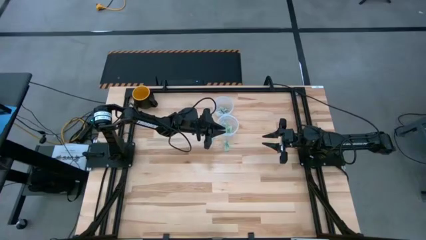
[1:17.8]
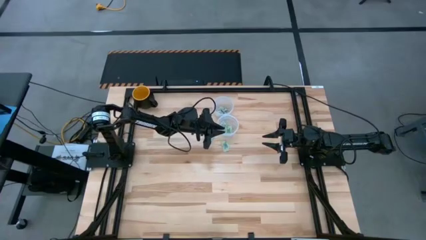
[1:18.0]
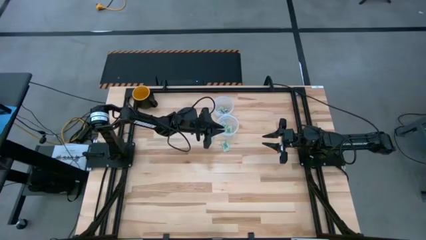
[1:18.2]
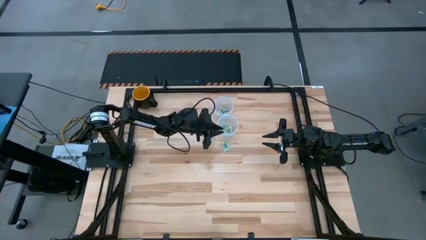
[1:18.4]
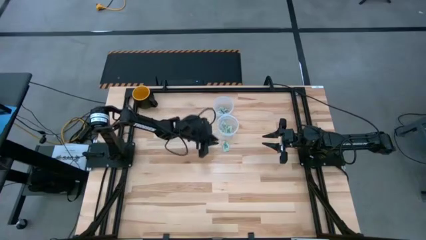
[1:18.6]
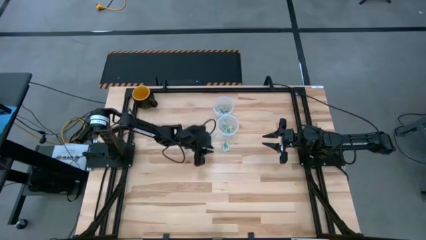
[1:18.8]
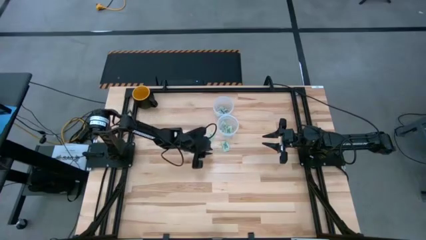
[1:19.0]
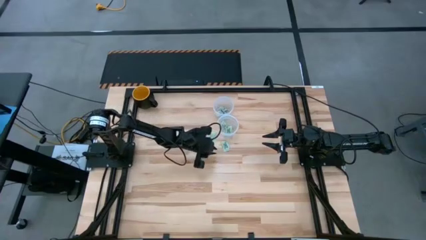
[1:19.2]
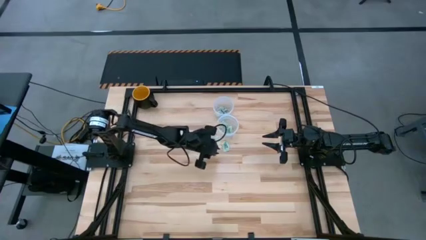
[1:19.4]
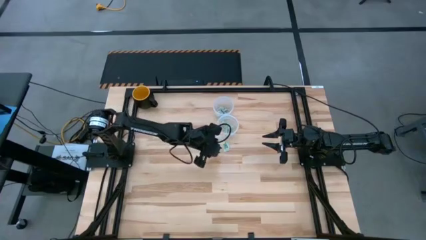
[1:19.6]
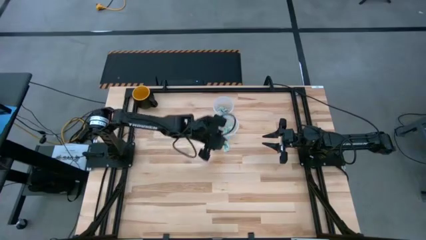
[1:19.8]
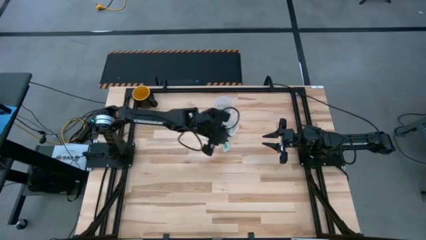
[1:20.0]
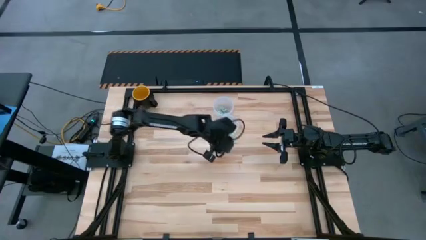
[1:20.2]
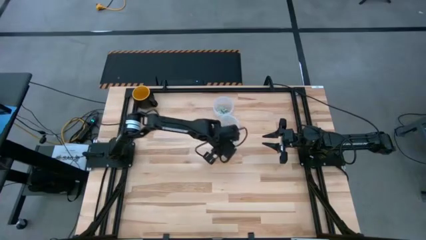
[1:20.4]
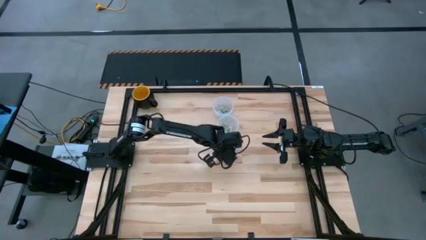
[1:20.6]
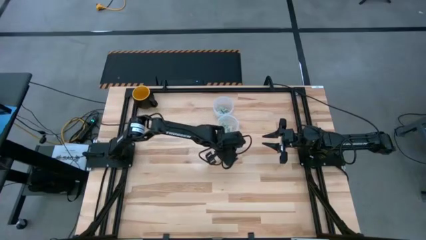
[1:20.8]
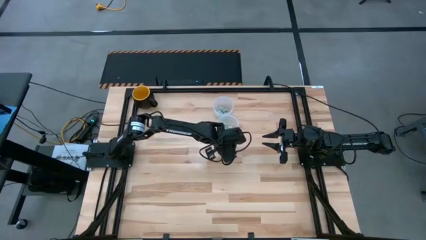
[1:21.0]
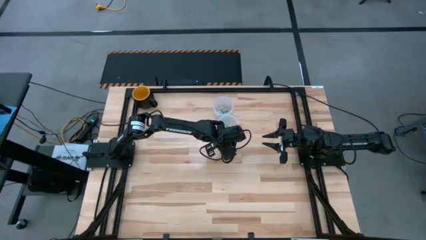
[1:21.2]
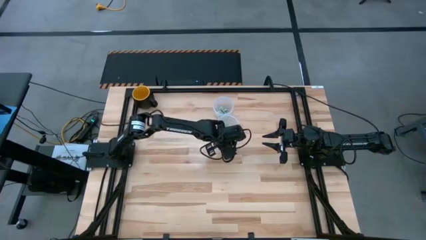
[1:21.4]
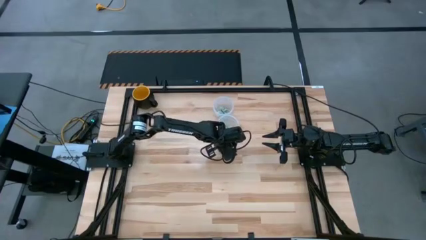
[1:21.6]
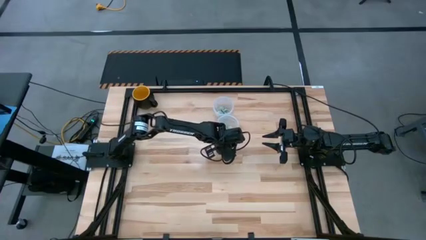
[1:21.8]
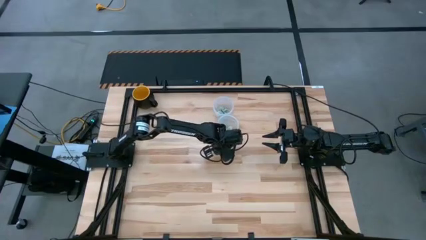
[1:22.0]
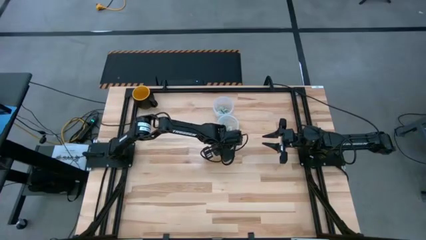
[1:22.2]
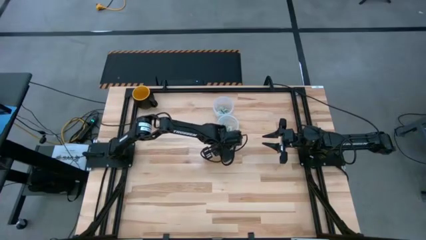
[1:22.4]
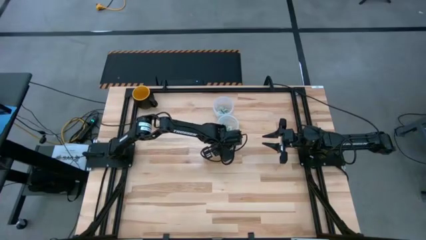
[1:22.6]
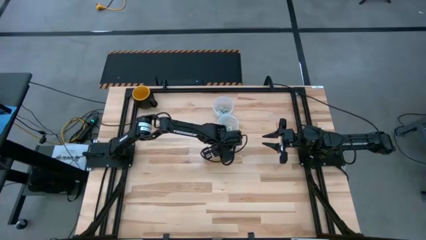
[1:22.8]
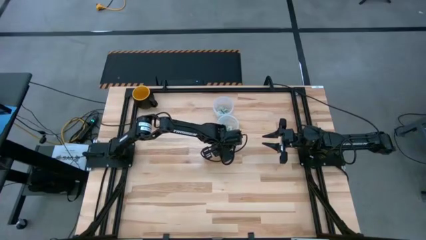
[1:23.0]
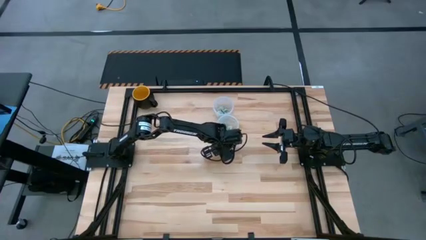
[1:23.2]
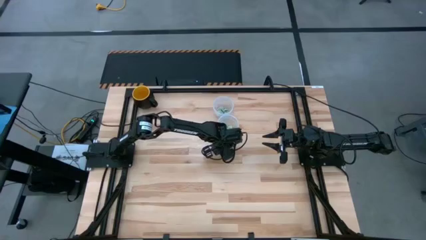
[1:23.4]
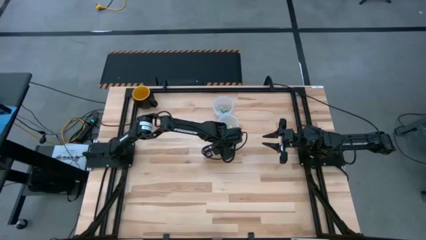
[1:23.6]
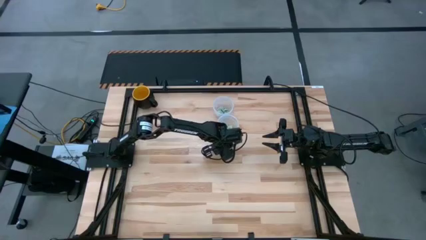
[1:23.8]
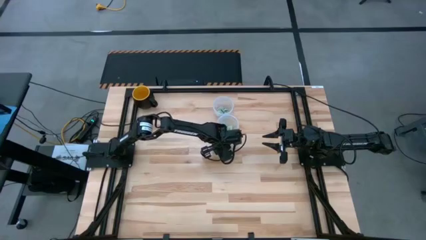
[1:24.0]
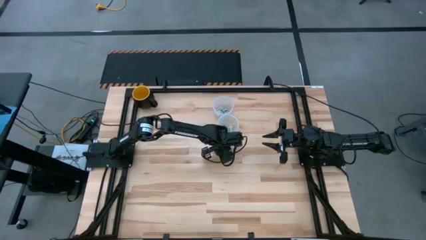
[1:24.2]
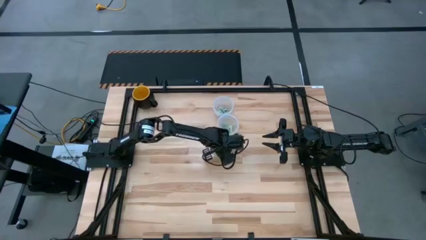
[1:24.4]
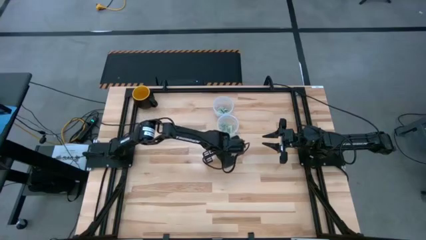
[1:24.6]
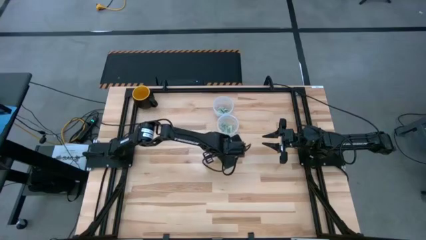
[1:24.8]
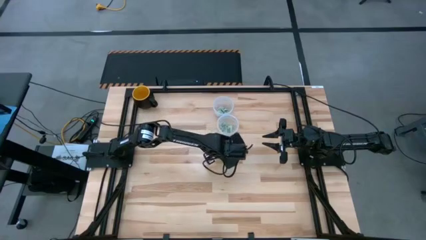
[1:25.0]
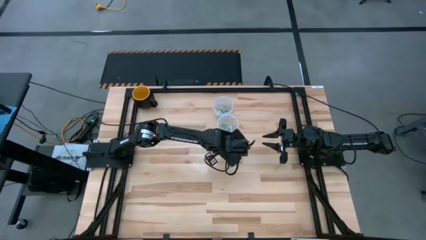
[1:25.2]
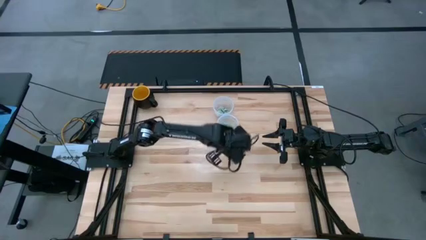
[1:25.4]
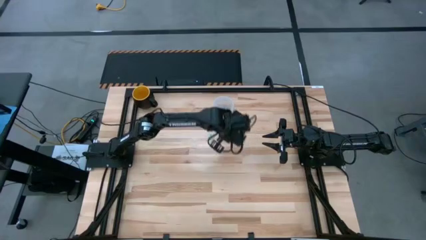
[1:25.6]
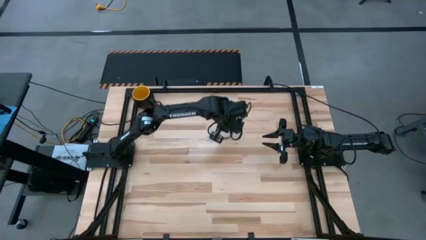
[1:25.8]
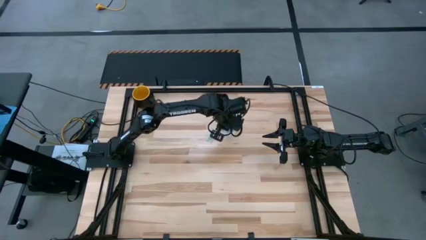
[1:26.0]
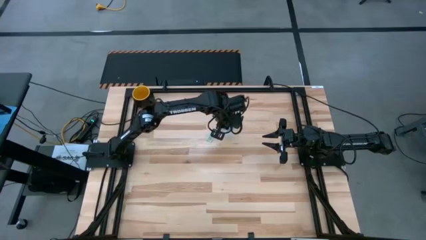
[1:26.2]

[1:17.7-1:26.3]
Task: Pick and place items into bin
Put the green stevia packet into the bottom transparent bin

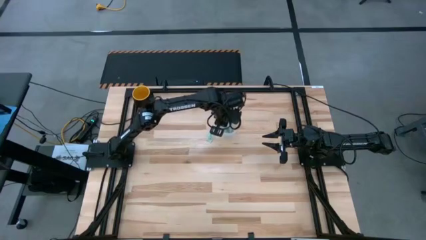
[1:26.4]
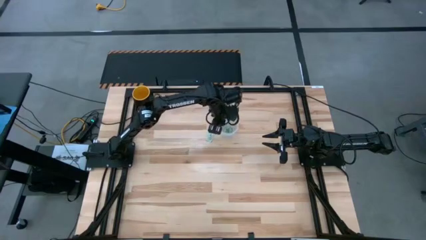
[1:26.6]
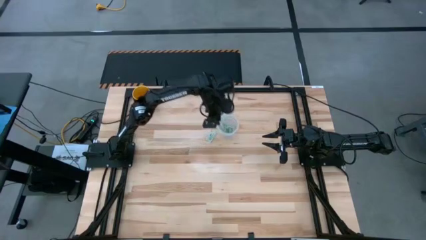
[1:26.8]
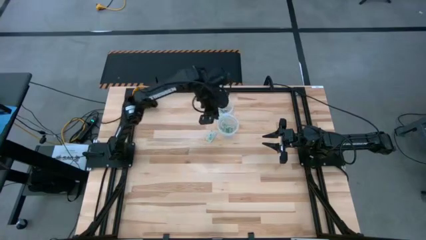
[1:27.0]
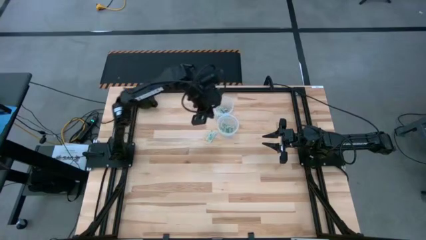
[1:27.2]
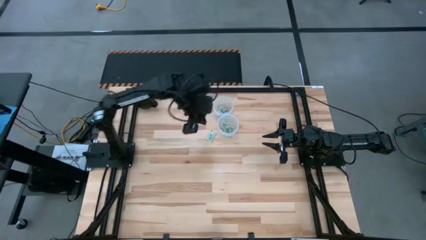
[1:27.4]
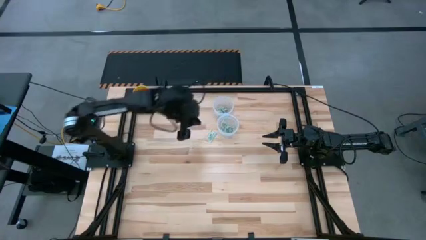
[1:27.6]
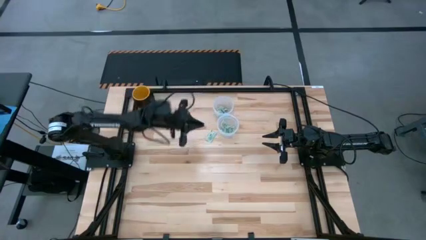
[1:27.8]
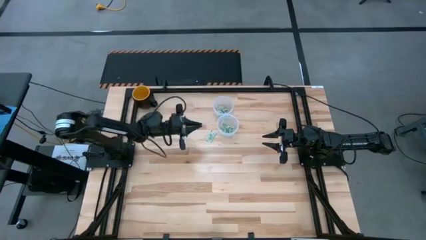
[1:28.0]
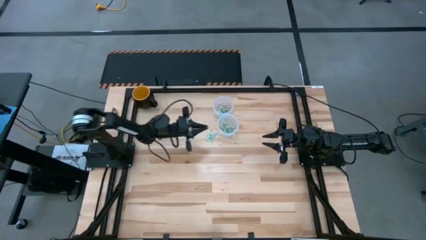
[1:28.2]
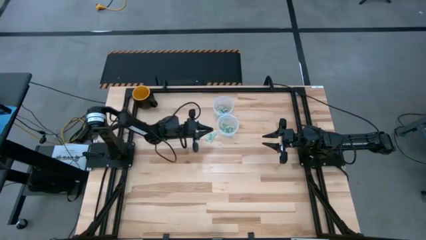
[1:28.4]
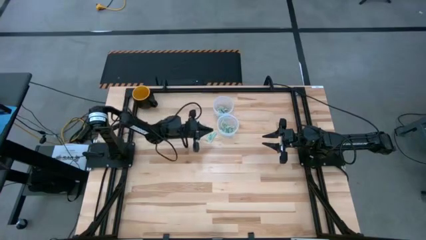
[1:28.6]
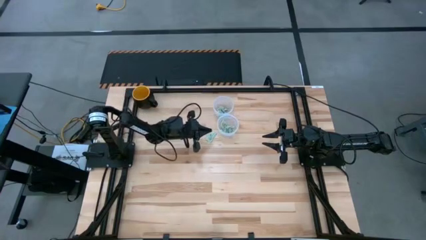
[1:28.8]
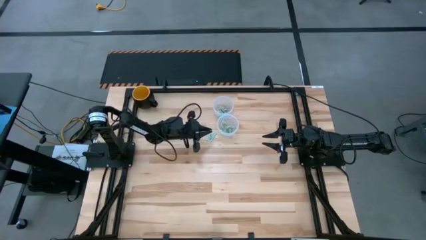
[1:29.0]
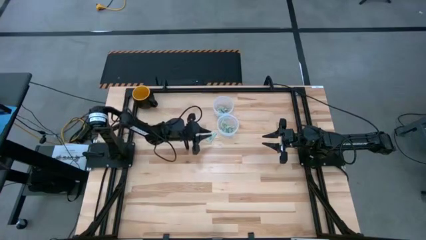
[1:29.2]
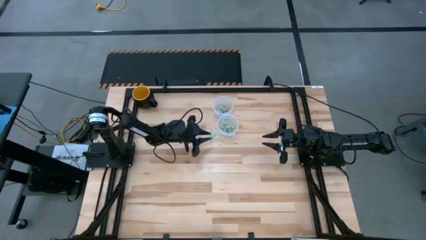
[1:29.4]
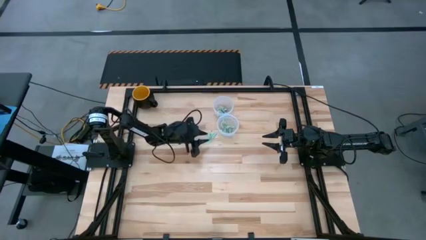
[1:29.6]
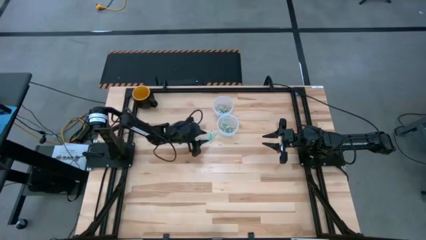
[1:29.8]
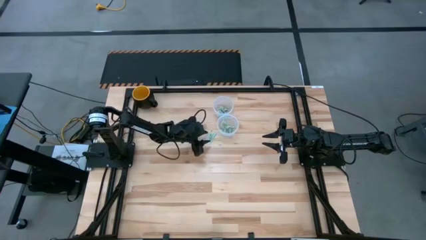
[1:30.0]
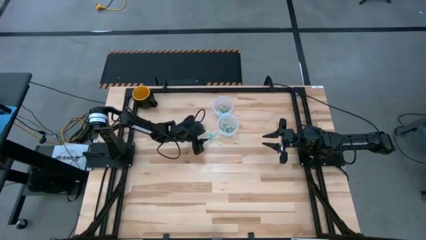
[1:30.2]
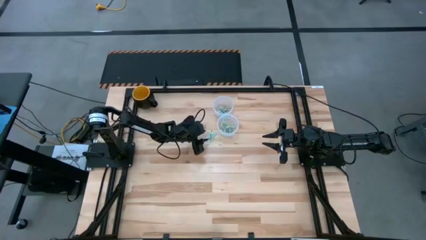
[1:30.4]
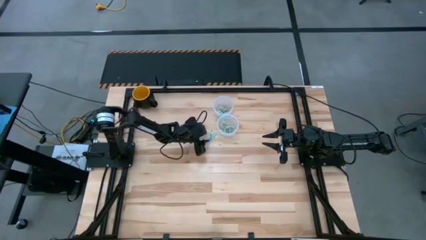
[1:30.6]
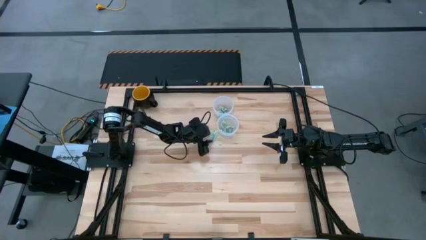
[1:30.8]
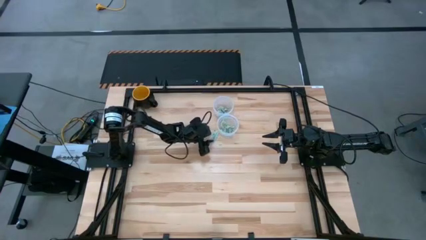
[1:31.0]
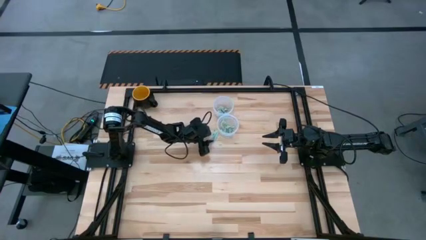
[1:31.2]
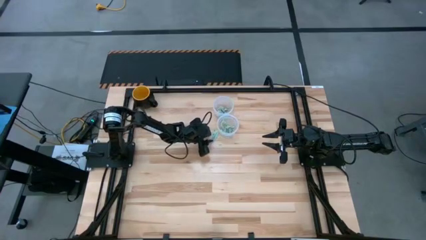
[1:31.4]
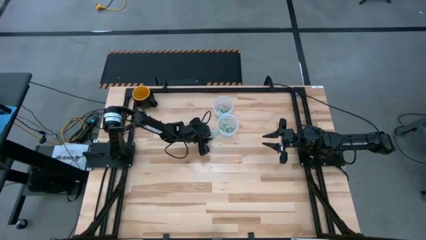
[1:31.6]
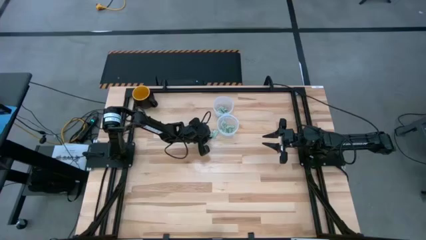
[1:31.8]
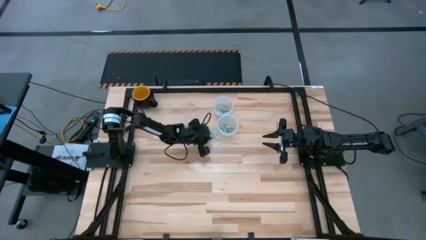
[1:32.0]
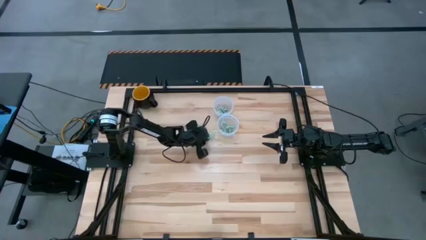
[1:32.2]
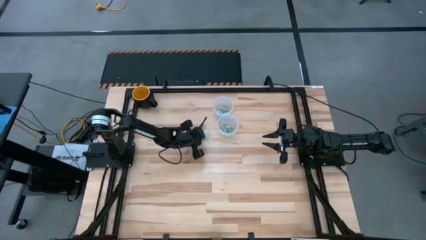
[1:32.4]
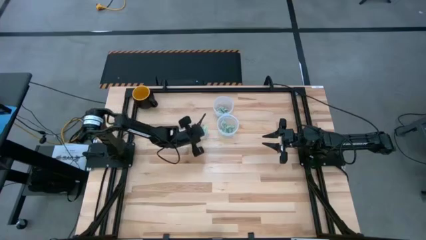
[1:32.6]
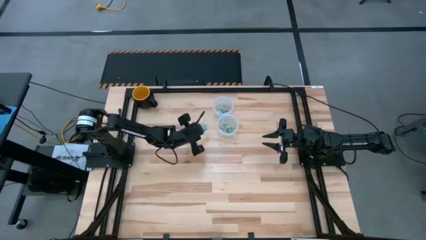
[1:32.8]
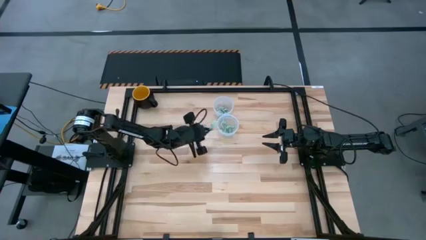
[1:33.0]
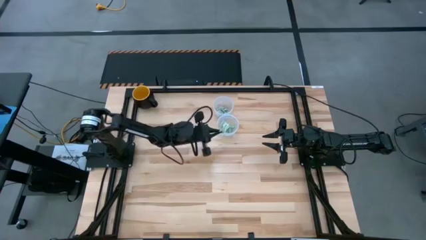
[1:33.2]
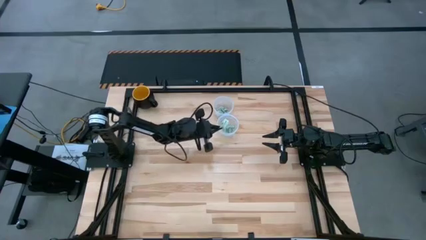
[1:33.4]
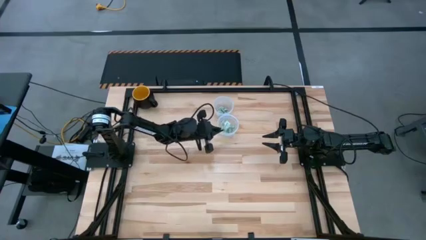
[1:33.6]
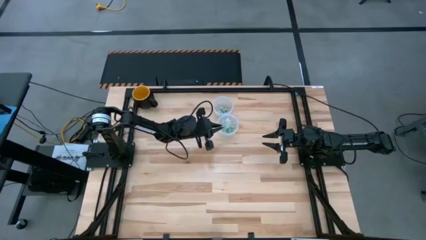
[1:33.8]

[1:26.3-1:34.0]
Put the green stevia packet into the bottom transparent bin
